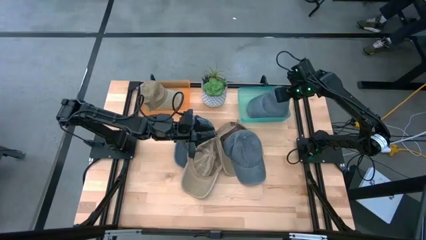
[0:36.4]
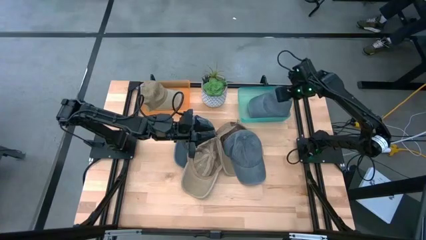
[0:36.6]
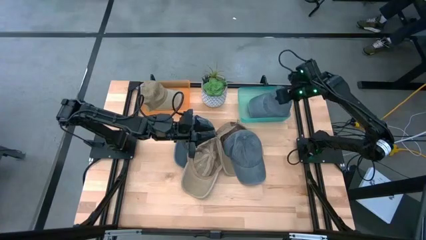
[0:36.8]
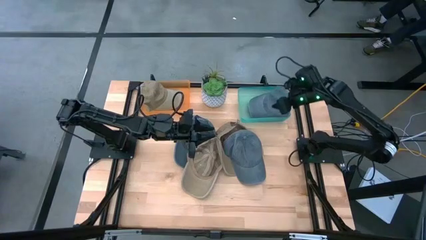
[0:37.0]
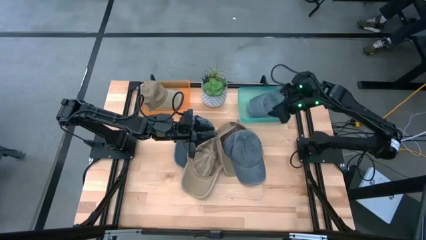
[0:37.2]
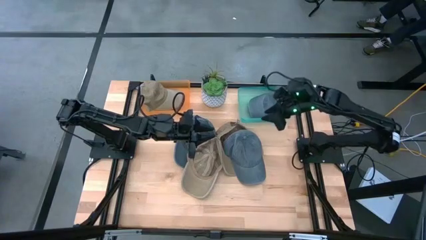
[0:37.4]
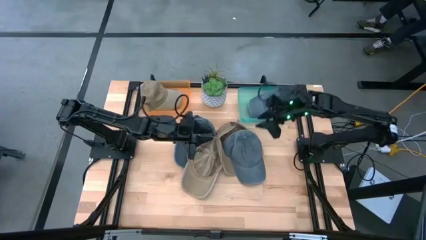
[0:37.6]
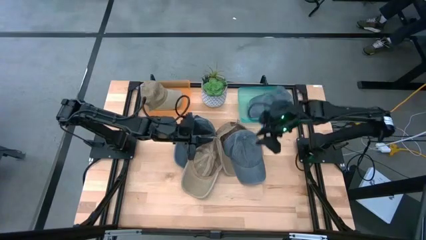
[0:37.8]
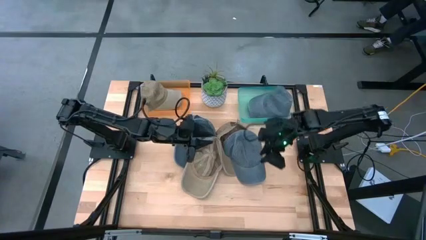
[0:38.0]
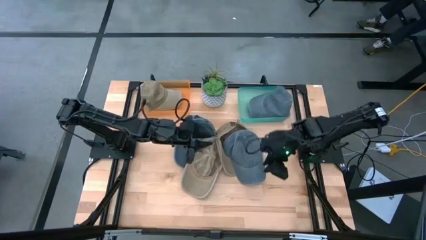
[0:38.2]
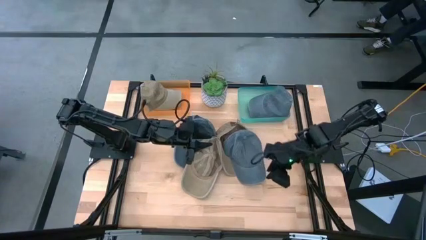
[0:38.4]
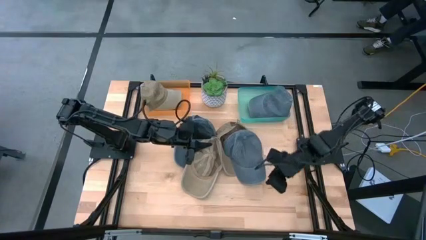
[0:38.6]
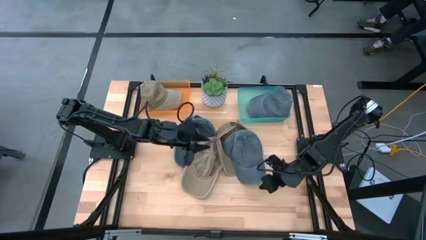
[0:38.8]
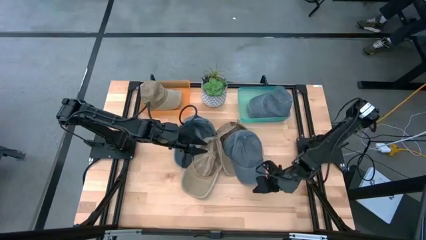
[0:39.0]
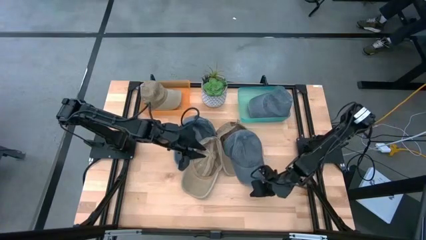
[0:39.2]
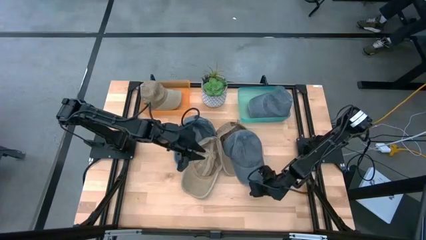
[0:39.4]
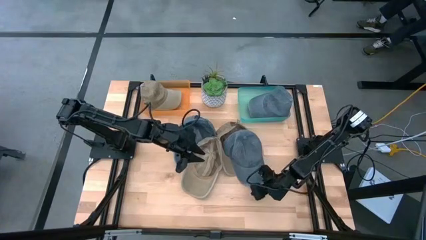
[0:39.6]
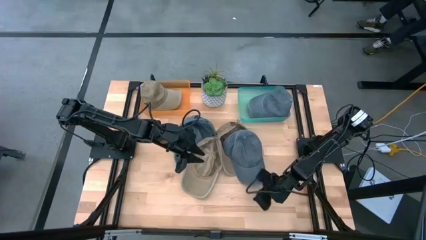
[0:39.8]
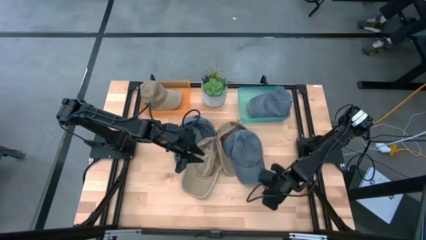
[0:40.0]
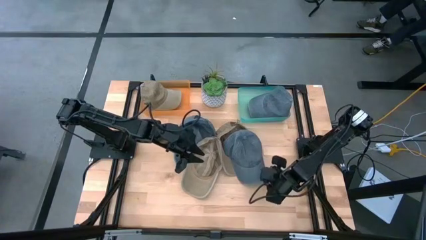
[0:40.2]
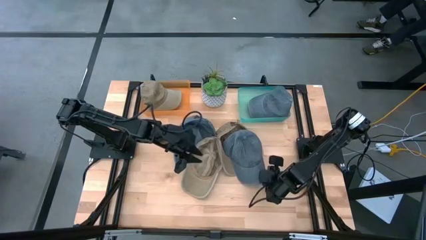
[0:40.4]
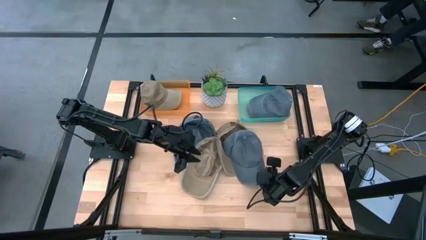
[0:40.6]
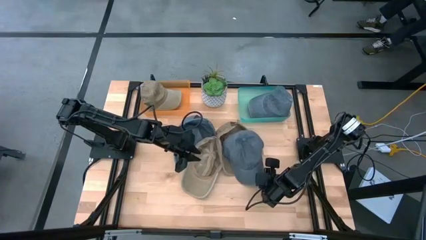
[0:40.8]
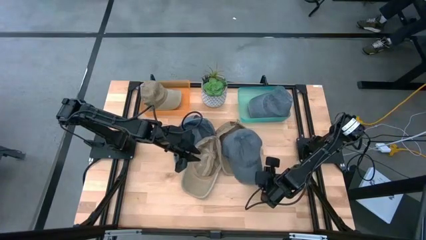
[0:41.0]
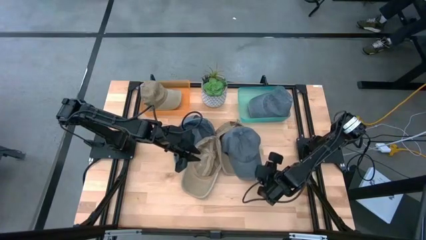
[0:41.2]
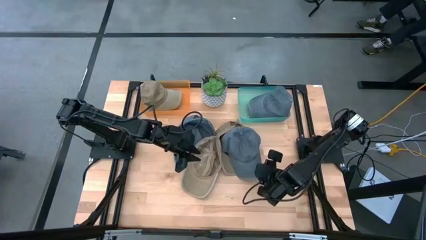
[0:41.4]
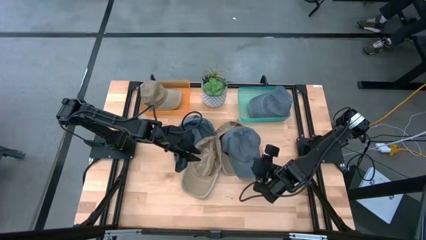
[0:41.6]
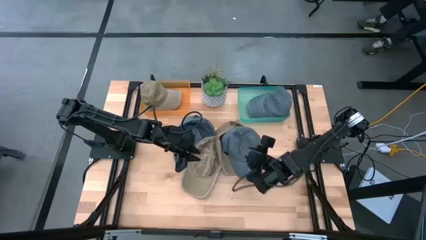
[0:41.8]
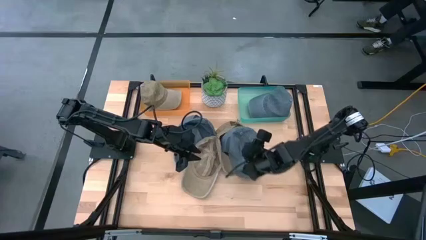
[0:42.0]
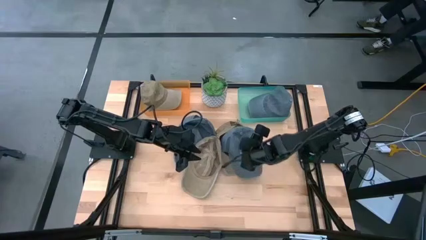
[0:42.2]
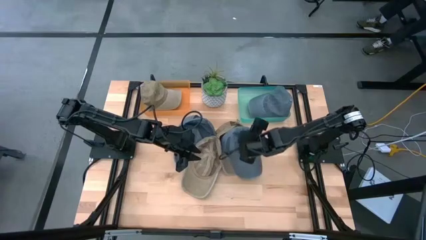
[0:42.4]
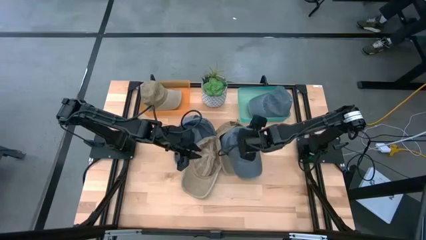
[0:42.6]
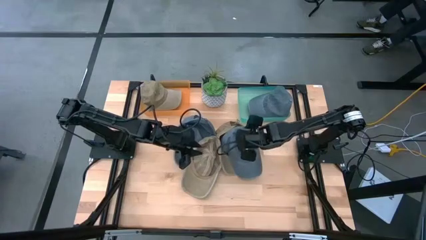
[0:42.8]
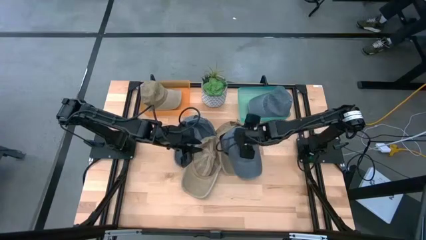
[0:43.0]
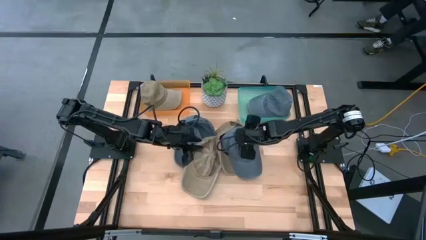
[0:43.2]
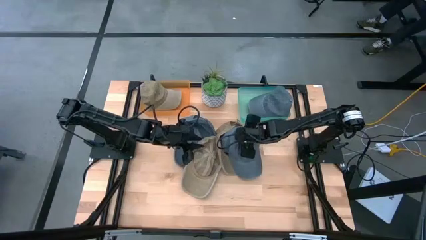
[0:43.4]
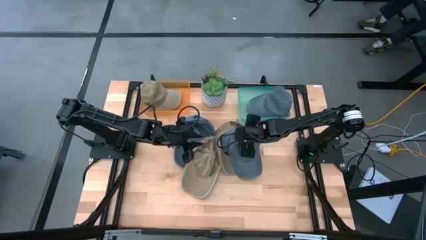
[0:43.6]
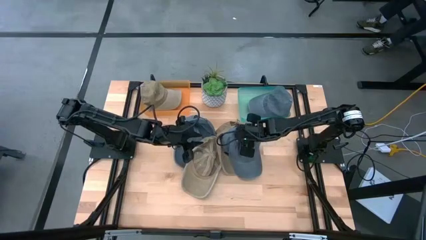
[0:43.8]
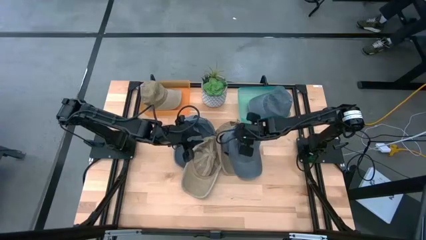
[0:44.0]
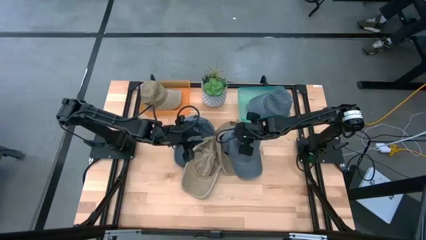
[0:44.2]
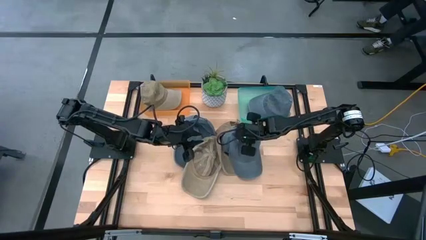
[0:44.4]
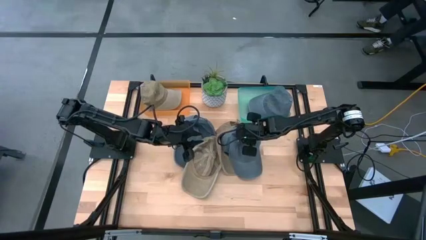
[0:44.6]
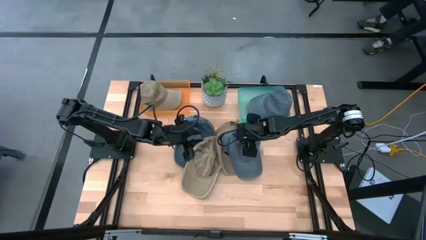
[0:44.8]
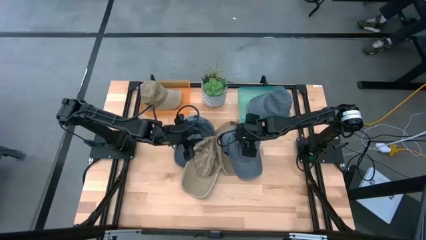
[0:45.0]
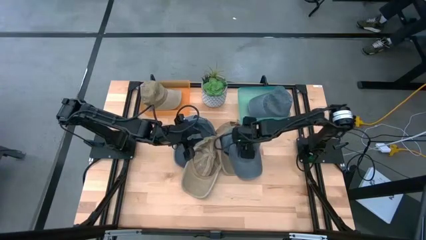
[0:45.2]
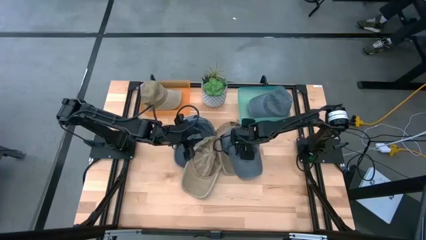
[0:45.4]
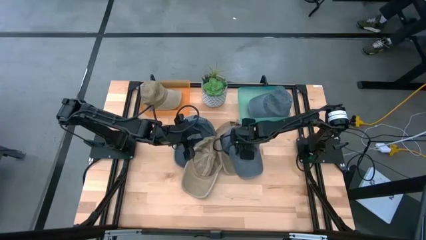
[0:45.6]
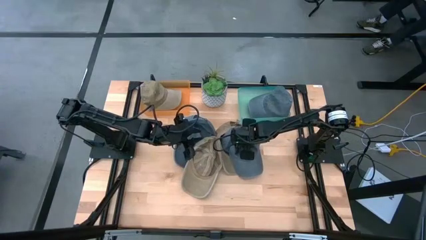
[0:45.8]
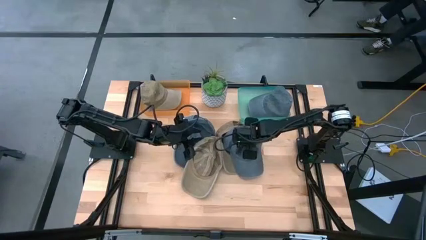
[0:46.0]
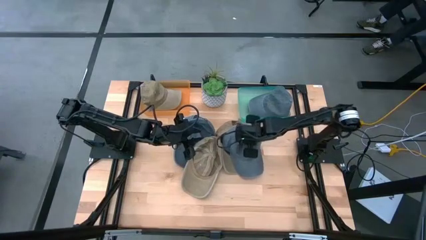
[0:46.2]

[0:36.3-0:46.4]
Task: Pick & Place hat
Put the right gray cap into the green bin

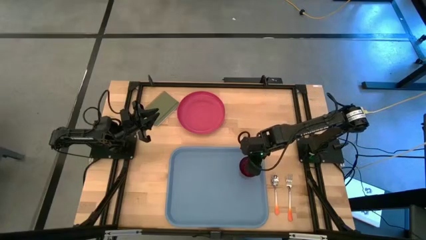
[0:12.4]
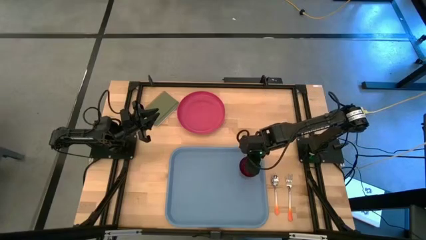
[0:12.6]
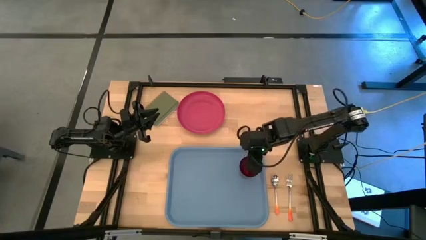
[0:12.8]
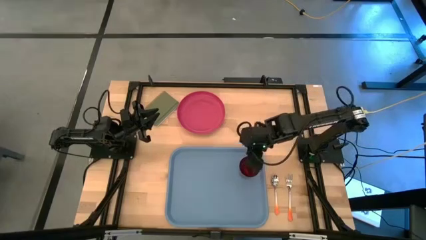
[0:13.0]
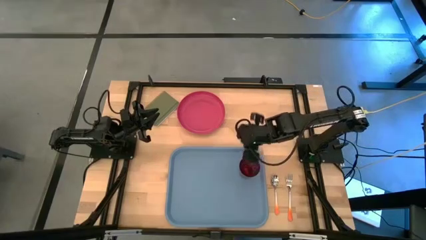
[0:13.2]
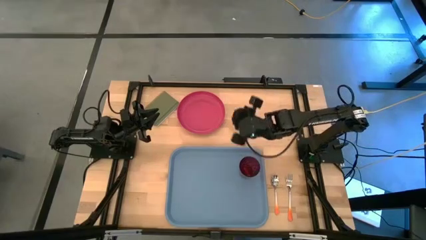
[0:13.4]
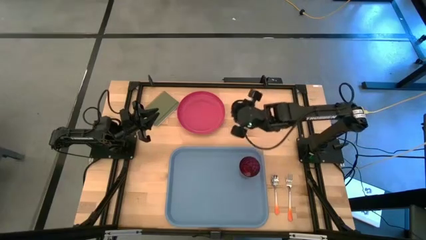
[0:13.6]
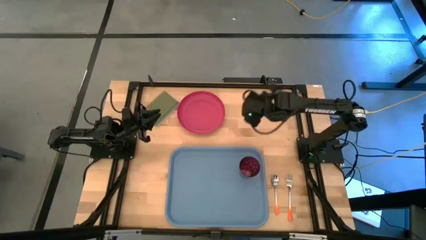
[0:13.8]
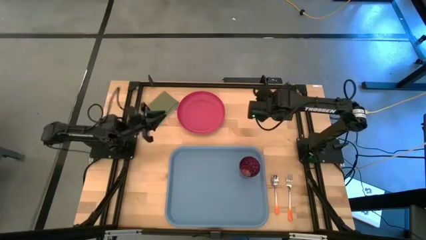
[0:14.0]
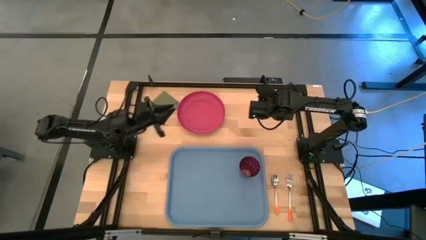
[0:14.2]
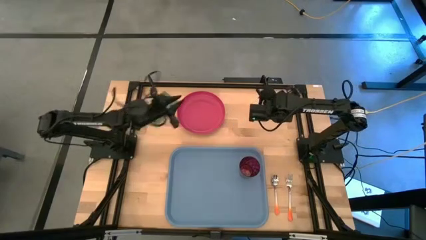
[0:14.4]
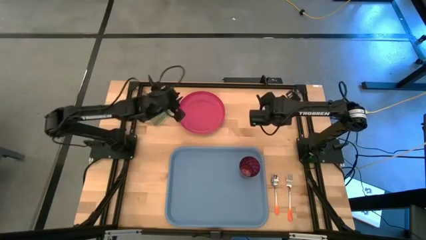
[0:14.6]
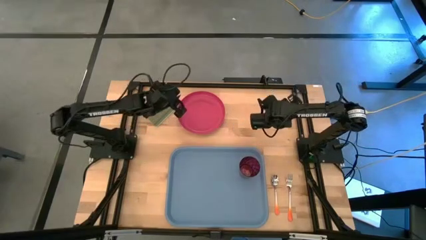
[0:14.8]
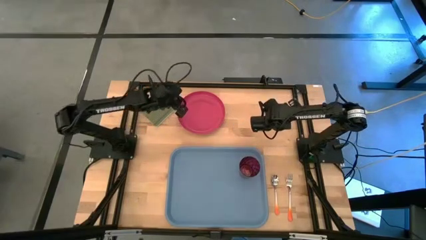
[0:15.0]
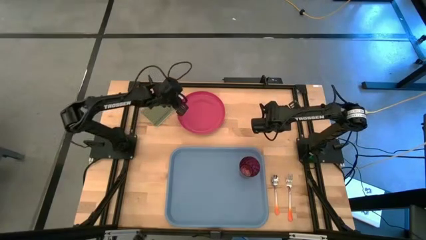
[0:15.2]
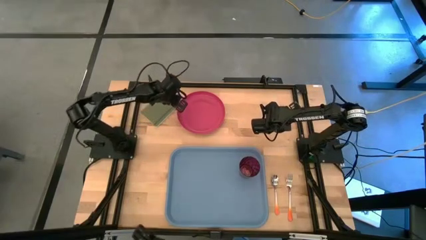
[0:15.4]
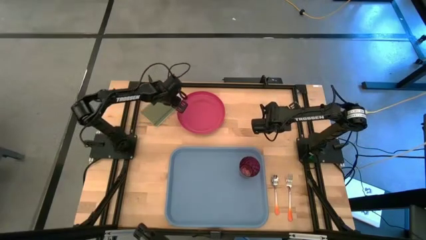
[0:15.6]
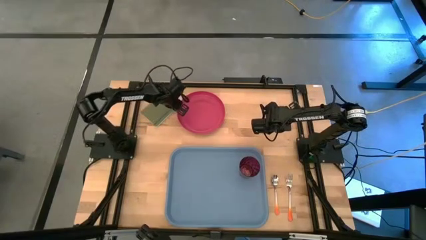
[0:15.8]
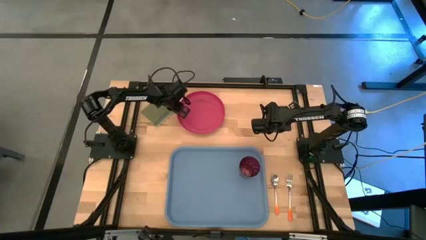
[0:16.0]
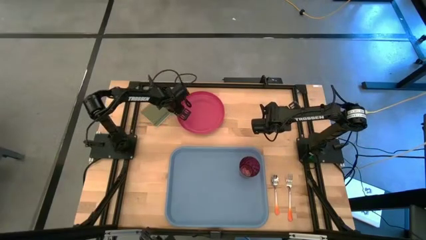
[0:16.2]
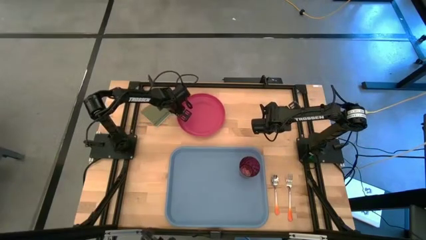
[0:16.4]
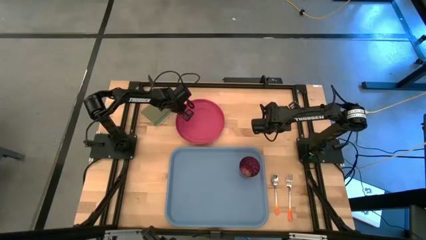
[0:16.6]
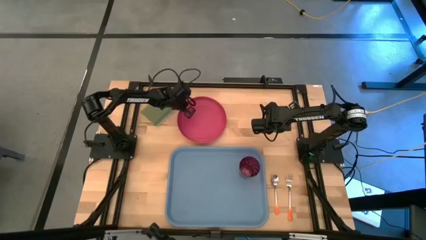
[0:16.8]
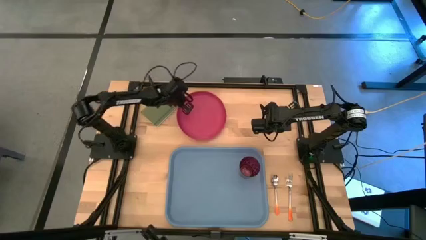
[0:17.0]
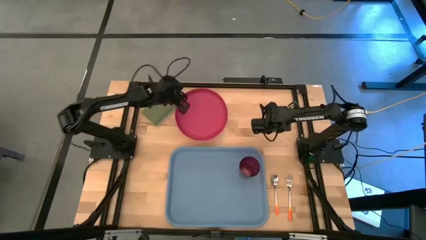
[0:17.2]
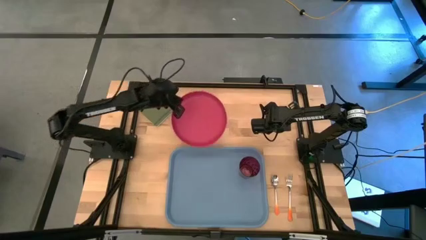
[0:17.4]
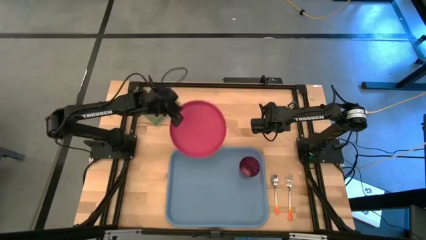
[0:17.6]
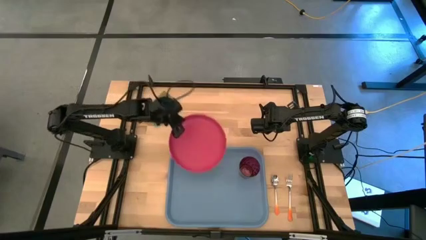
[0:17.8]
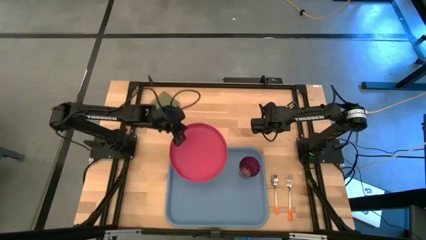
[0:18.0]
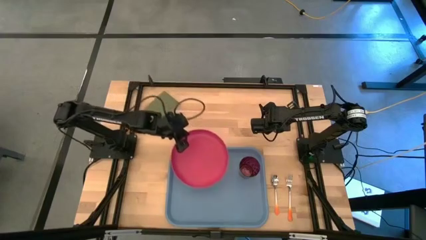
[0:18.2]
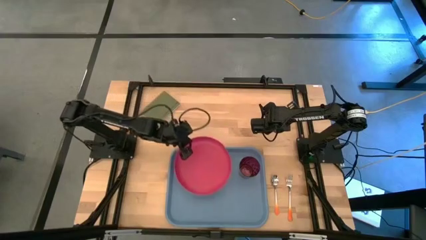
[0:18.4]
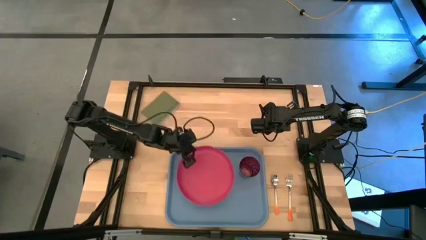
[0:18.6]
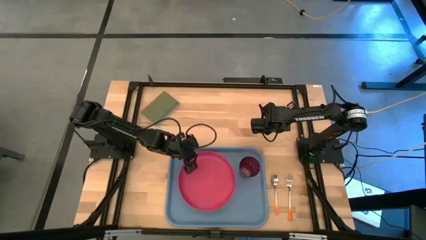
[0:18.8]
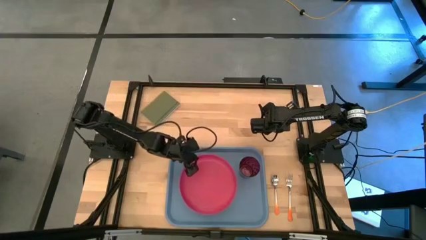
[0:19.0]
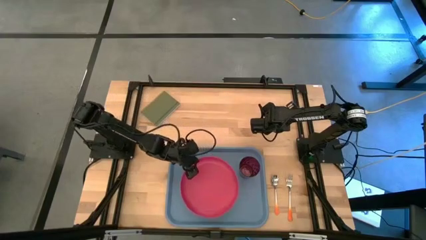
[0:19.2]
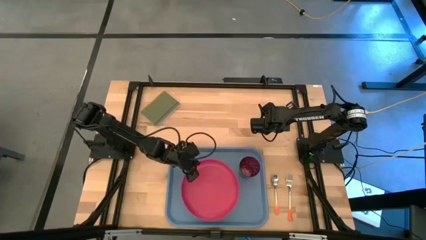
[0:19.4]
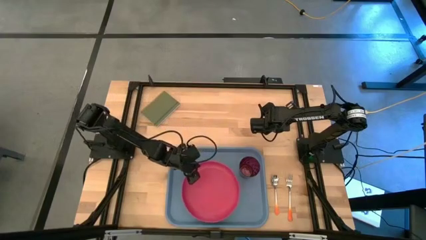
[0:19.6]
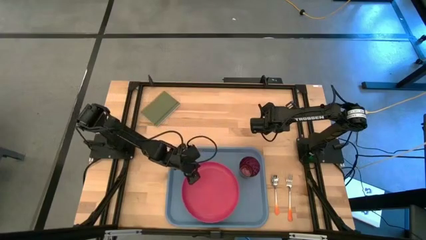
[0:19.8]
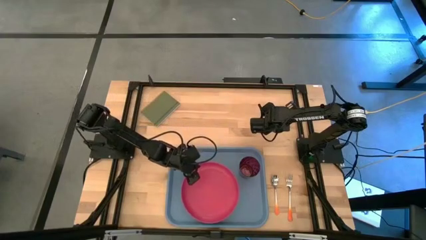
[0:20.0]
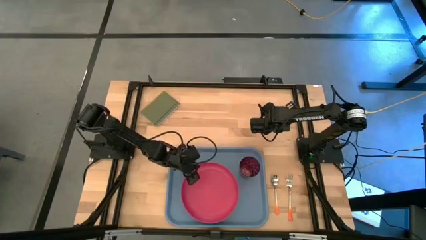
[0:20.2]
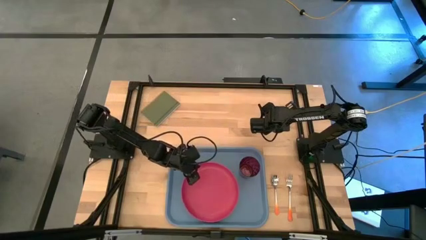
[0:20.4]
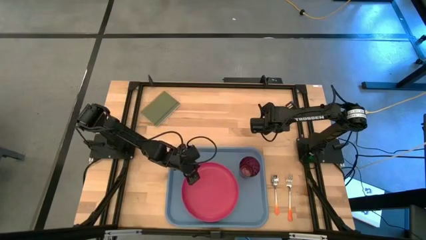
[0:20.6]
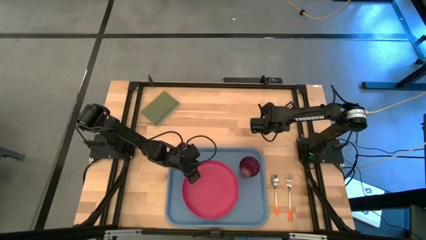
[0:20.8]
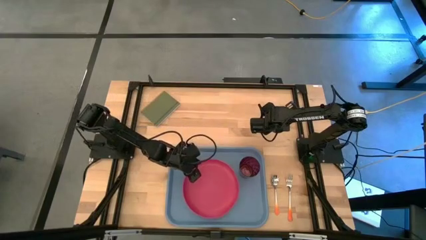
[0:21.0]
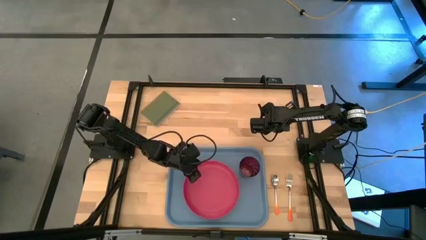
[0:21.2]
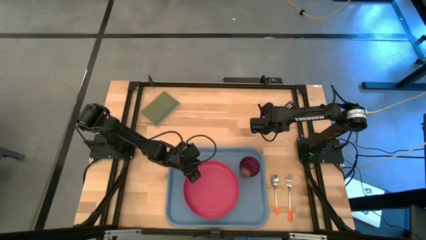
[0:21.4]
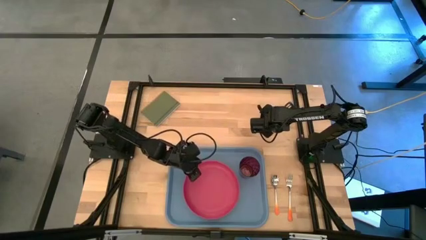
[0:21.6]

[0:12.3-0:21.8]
Task: Pick and place plate/cup/fork/spoon on tray
Put the pink plate on the blue tray to the left of the red cup
